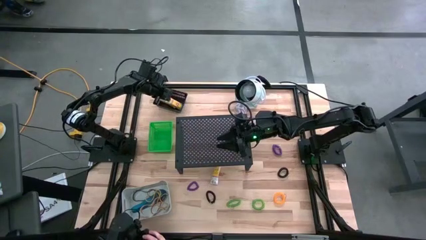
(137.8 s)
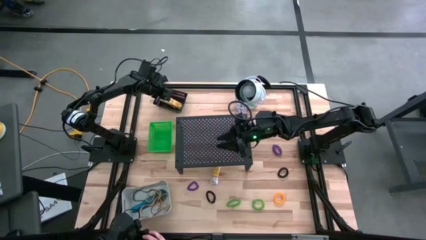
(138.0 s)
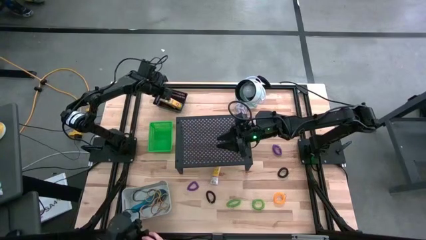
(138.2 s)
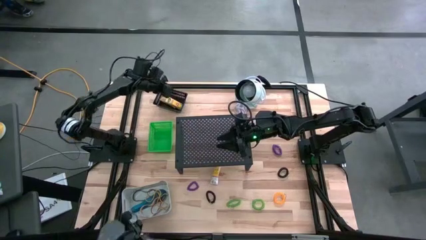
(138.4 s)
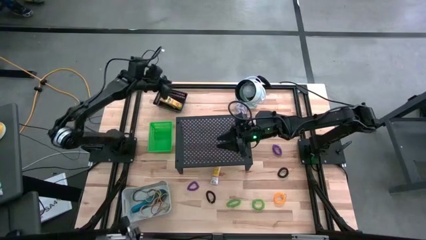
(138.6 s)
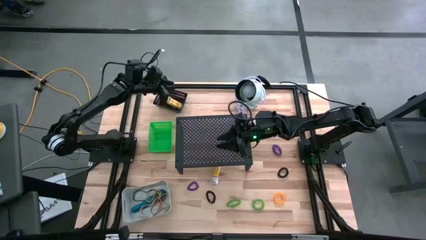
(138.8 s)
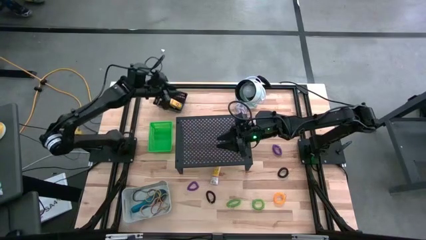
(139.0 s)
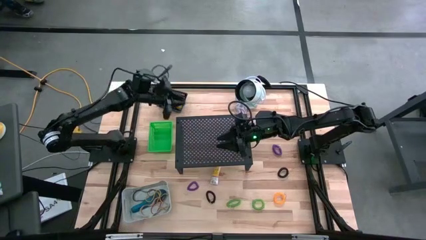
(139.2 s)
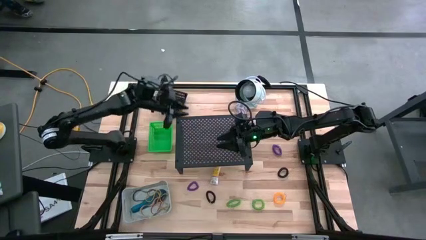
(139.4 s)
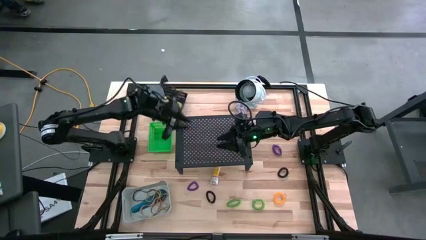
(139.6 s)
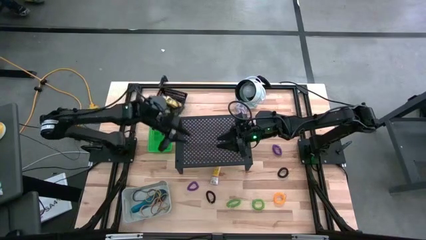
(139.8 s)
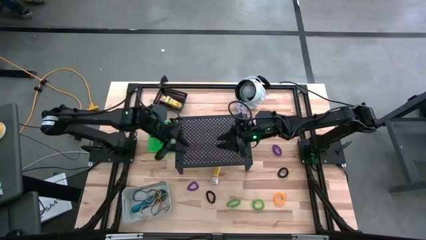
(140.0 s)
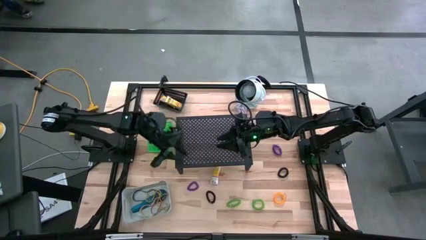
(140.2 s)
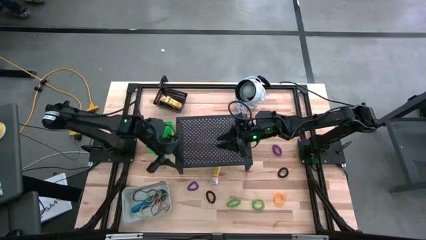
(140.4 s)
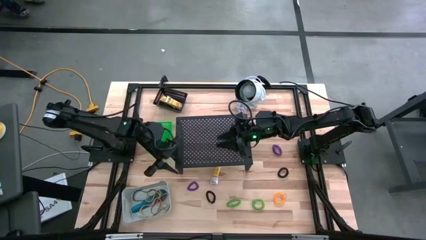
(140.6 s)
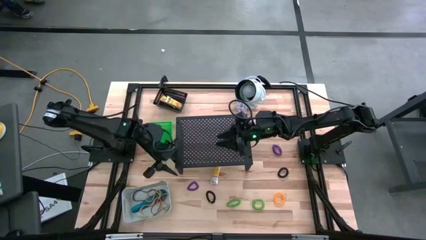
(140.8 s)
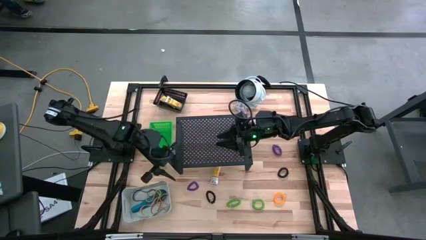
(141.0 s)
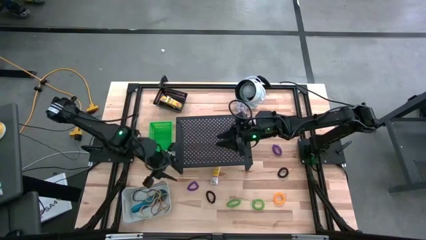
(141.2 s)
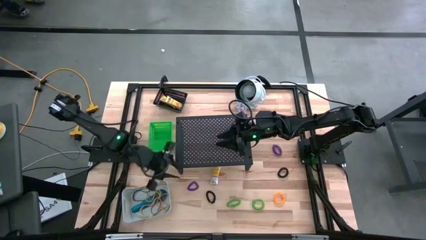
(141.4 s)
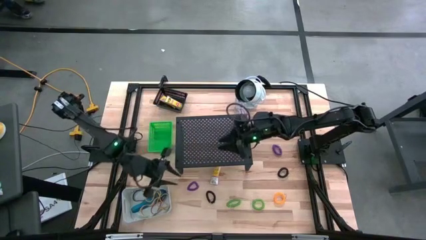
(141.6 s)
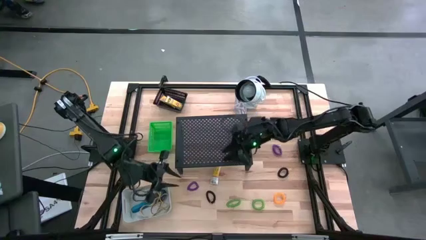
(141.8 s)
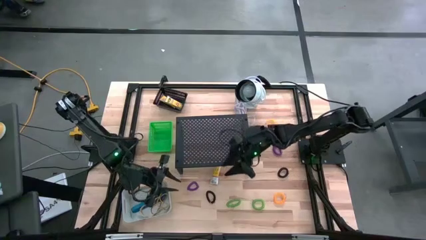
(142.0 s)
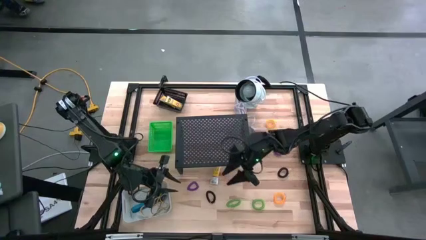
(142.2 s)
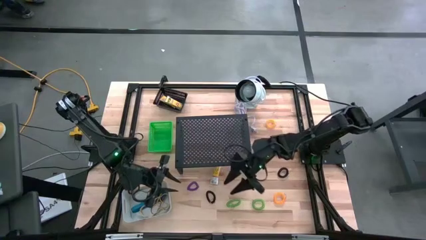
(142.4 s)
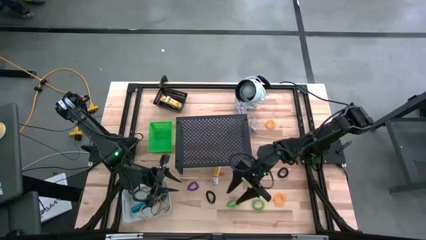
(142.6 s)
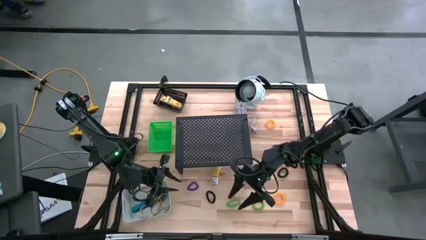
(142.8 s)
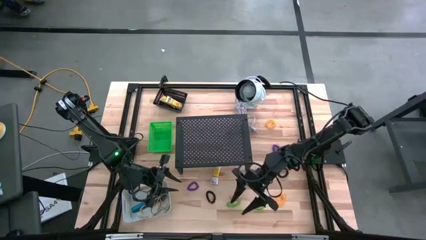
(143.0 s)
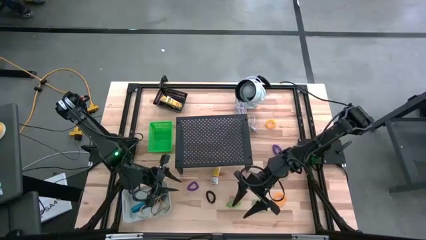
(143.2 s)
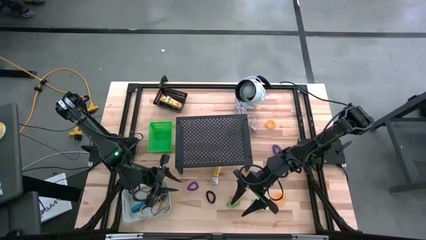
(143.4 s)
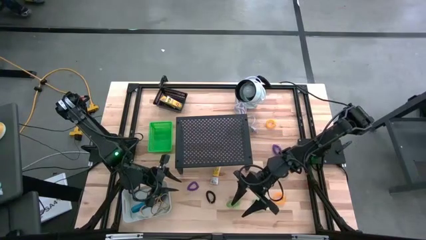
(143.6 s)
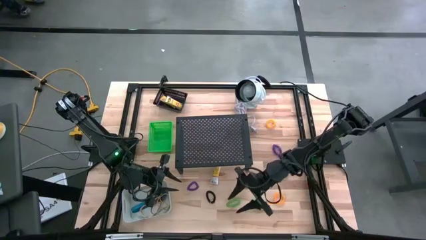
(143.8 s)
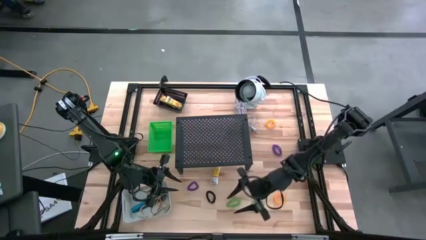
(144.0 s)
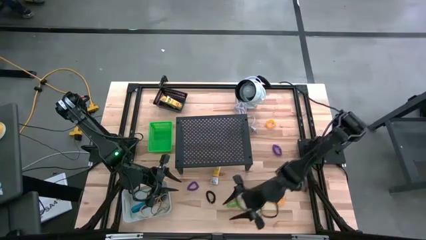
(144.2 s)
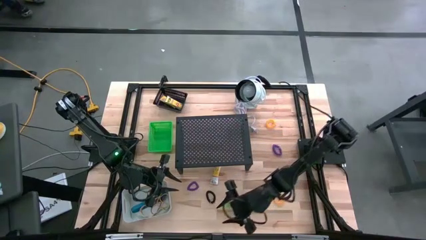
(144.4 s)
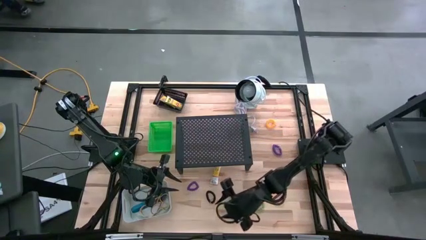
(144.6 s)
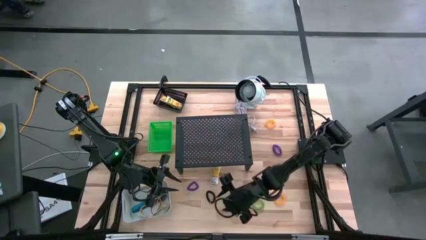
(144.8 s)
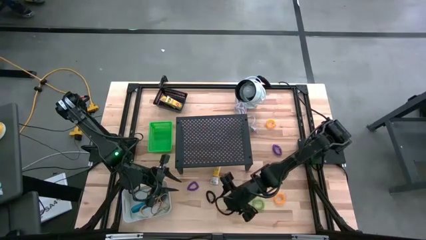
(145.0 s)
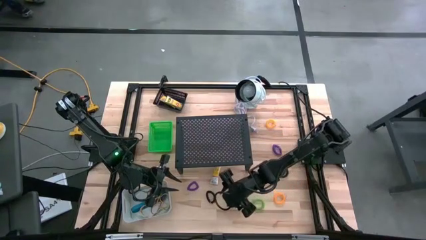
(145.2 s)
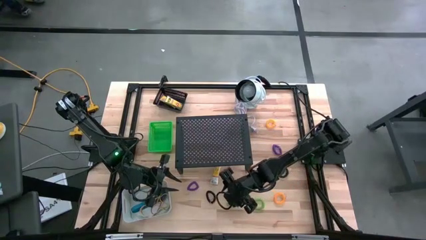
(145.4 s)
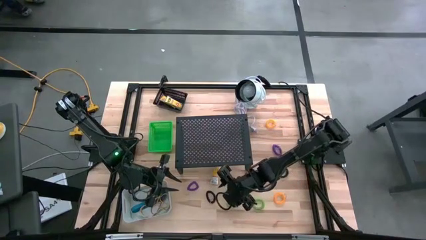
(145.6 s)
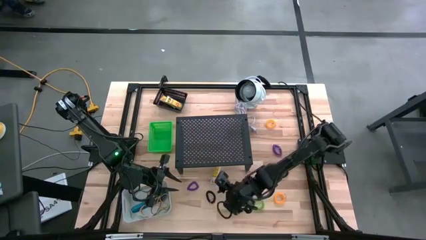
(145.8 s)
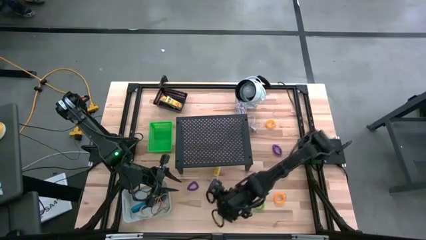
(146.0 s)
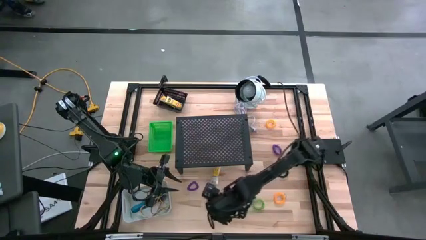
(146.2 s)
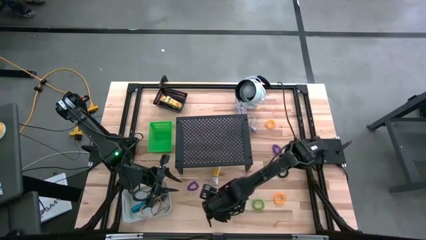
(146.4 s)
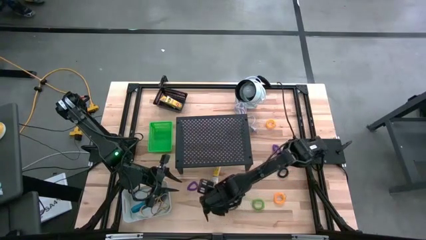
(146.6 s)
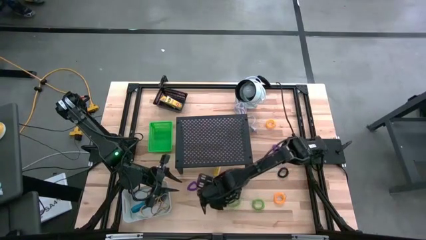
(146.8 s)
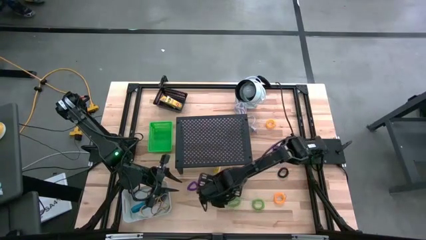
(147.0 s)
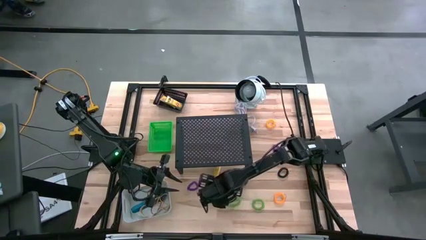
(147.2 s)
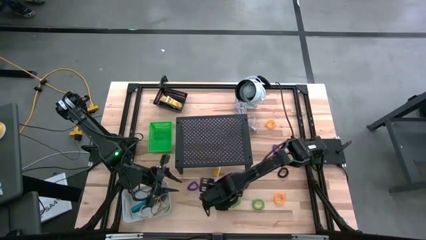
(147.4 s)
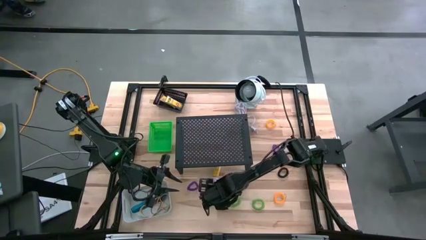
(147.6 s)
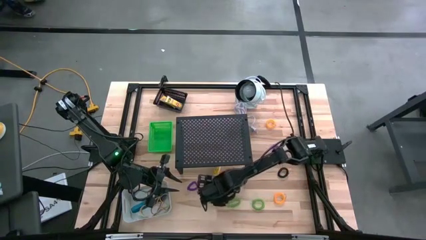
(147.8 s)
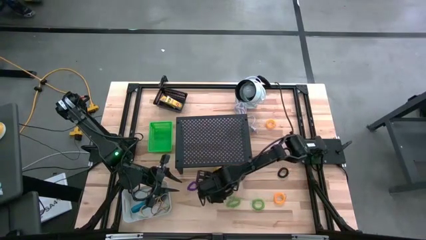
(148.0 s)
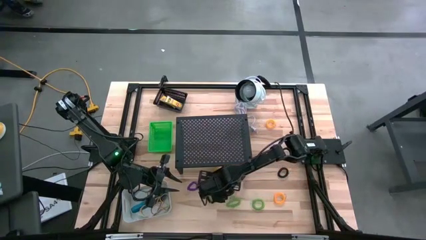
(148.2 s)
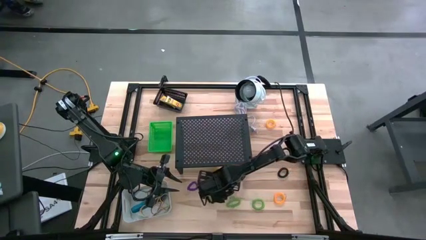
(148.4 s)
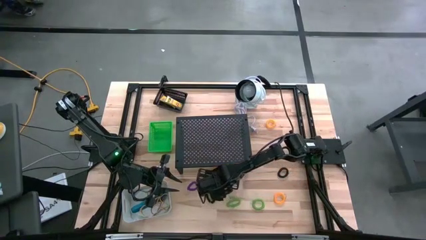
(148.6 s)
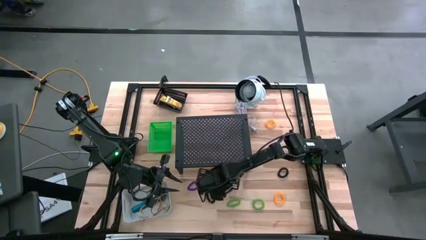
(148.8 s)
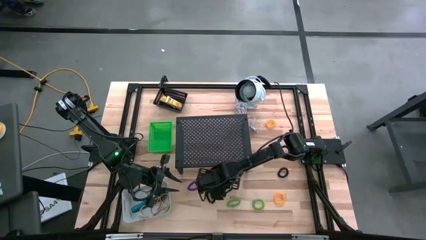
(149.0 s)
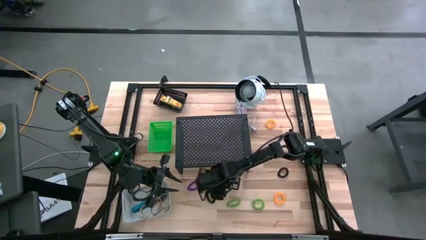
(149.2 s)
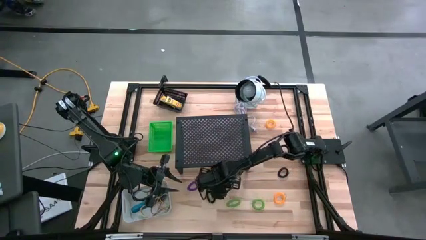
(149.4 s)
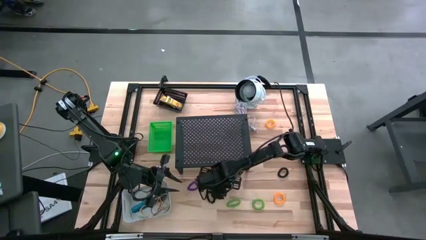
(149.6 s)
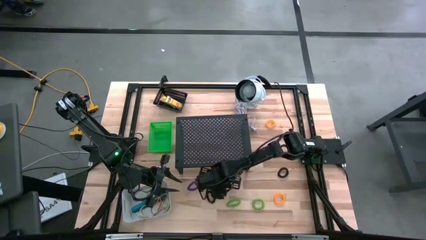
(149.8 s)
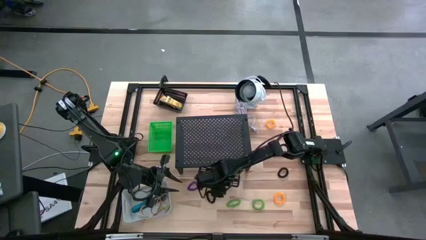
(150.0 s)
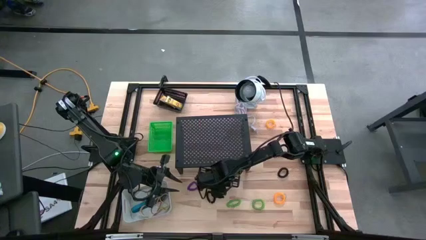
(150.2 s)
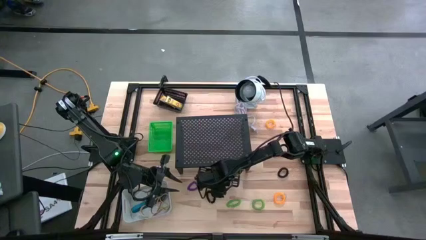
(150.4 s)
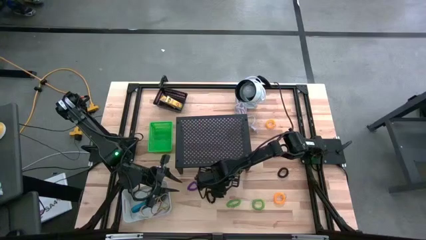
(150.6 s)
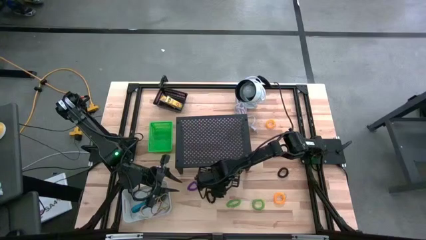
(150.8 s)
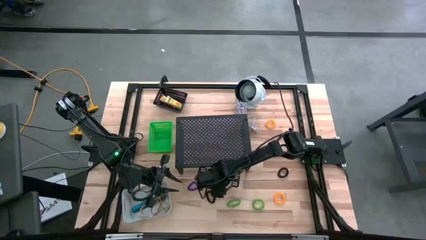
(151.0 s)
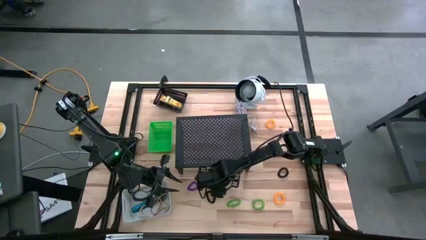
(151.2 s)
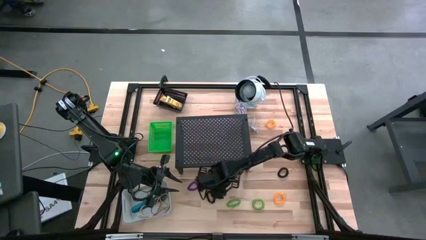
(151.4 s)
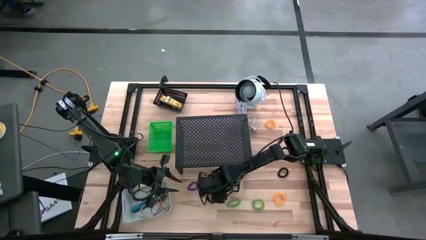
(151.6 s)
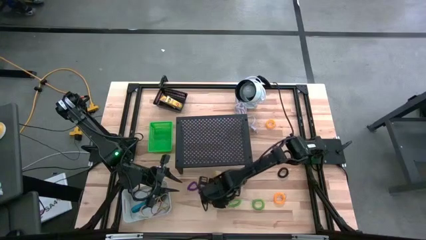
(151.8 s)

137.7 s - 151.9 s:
Task: Pick & Place Office Desk Supplies
Put the crayon box into the black bin

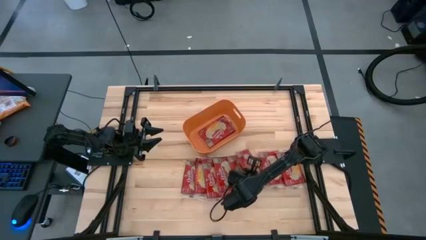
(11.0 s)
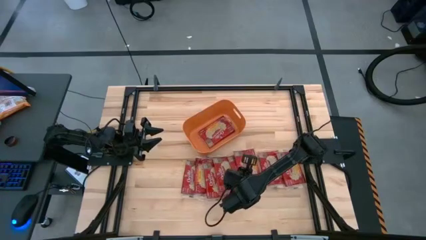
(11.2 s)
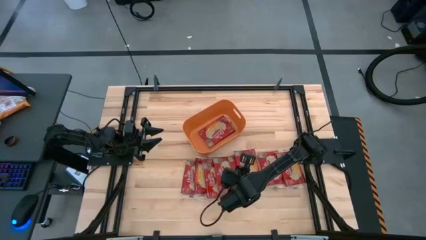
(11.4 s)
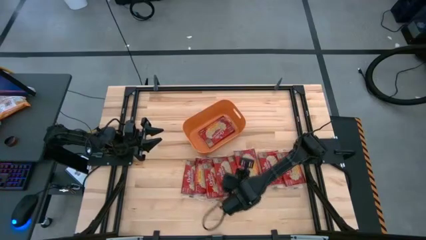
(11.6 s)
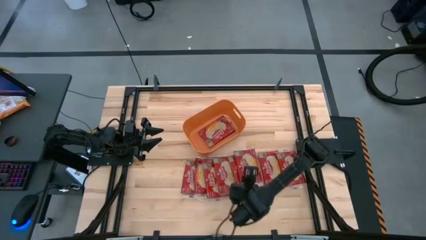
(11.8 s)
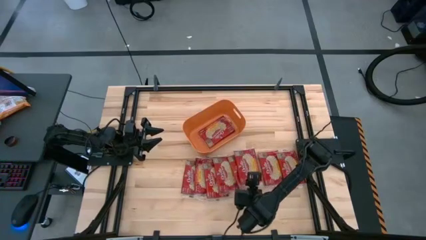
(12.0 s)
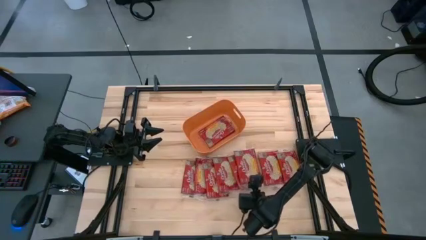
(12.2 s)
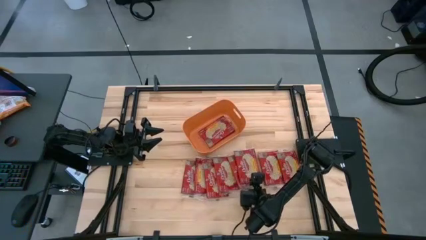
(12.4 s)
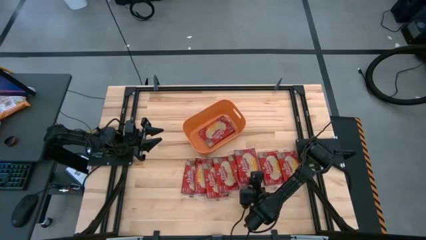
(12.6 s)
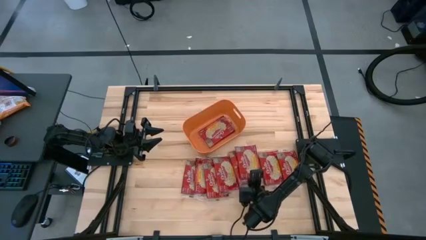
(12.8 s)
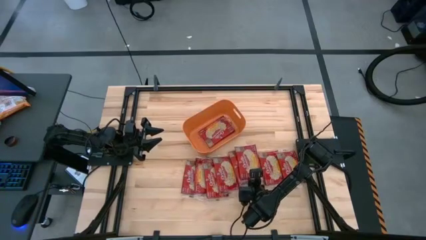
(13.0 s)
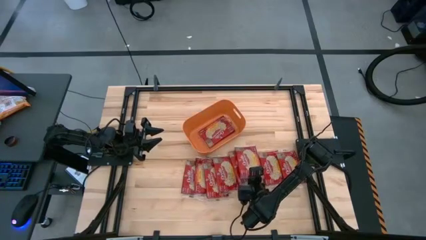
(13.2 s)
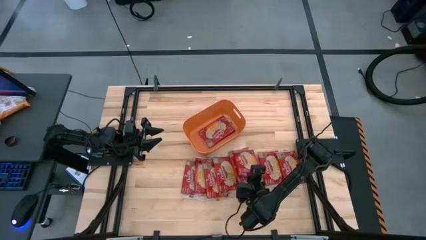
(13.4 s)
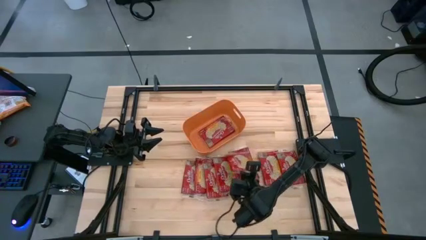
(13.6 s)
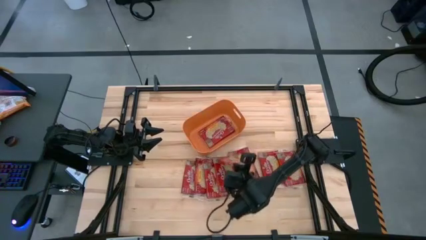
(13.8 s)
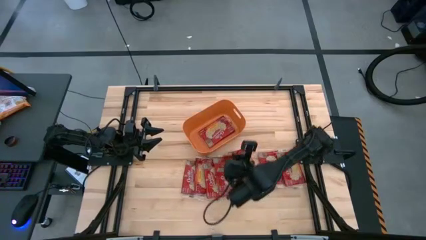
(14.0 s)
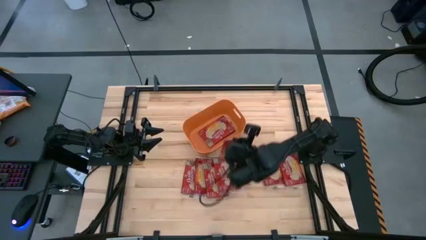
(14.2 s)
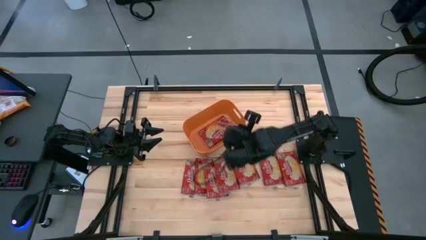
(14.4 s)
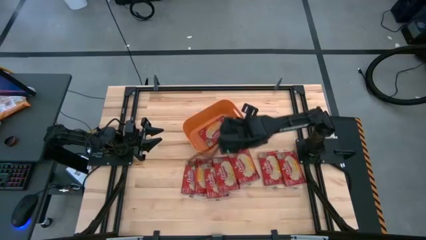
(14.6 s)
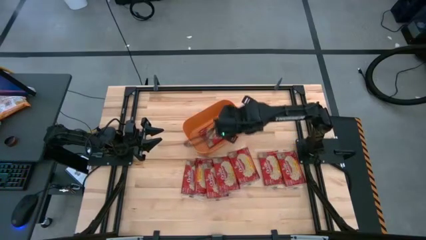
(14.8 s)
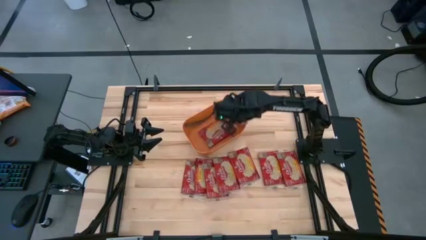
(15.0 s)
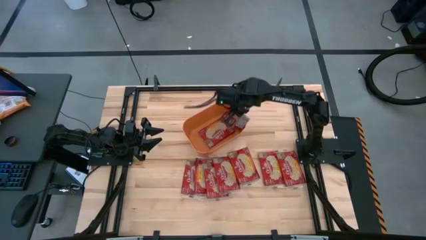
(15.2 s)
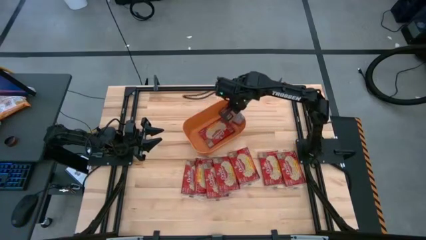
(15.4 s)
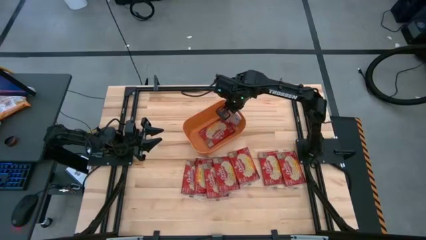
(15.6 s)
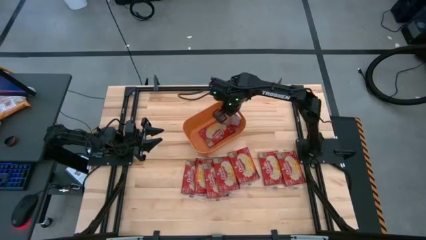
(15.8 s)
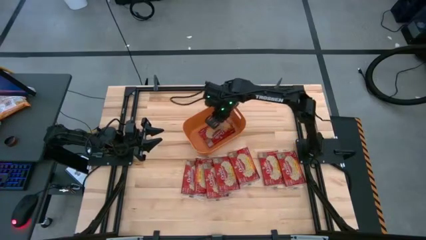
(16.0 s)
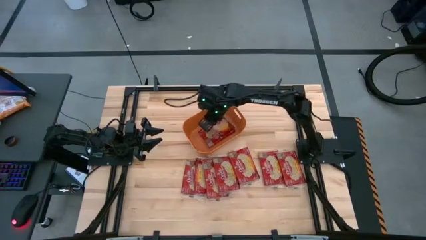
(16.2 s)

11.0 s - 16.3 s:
Task: Sort popcorn bags into baskets
Put the pop corn bag into the orange bin
